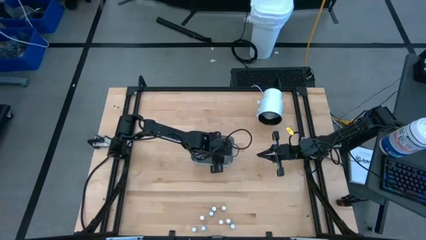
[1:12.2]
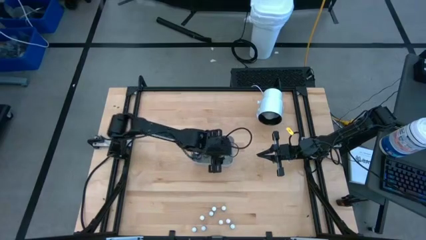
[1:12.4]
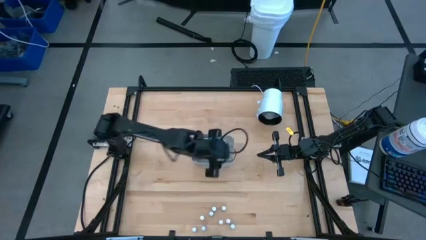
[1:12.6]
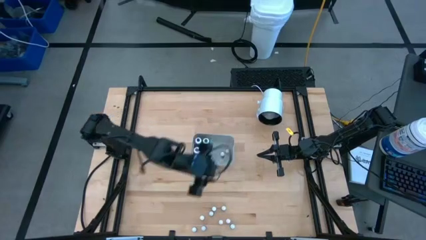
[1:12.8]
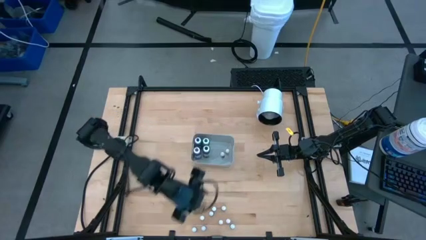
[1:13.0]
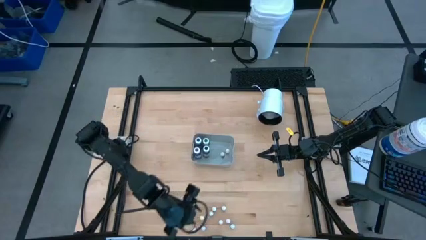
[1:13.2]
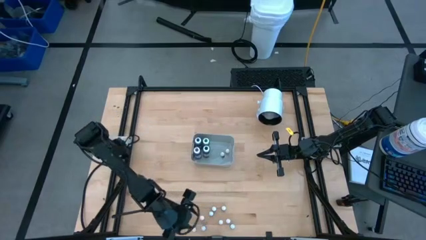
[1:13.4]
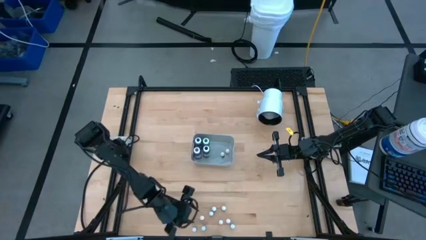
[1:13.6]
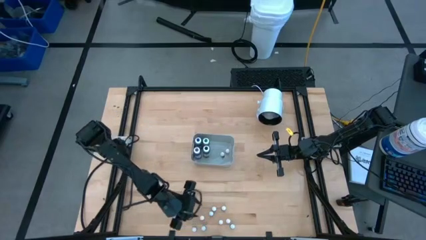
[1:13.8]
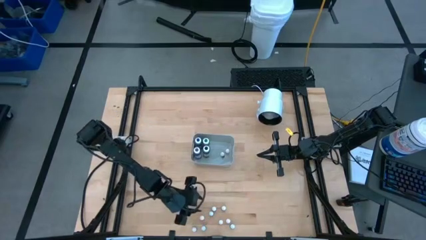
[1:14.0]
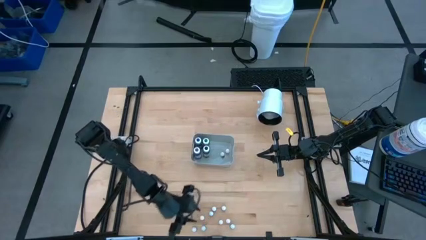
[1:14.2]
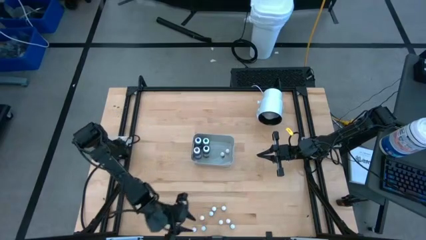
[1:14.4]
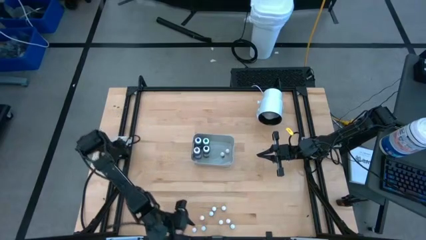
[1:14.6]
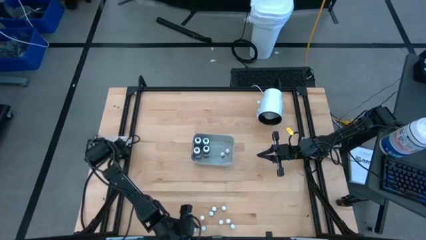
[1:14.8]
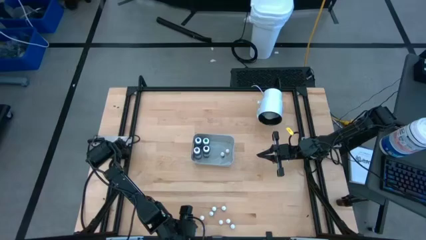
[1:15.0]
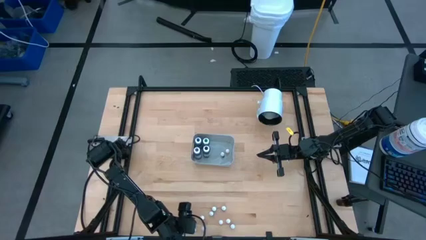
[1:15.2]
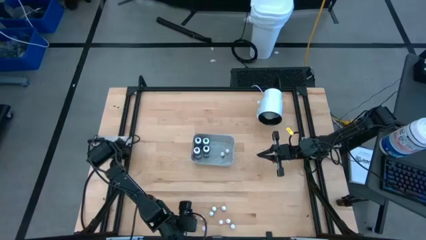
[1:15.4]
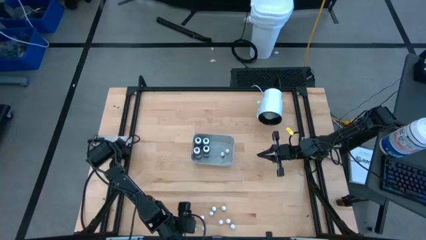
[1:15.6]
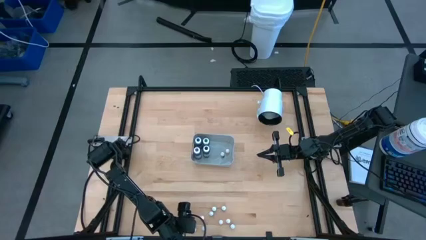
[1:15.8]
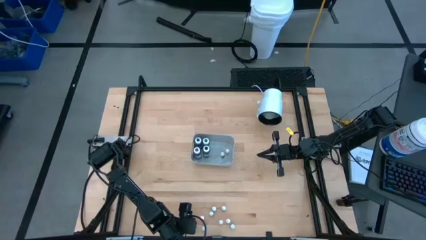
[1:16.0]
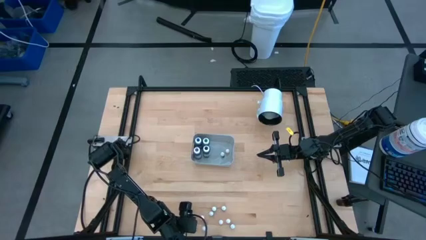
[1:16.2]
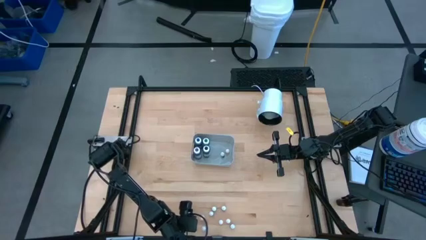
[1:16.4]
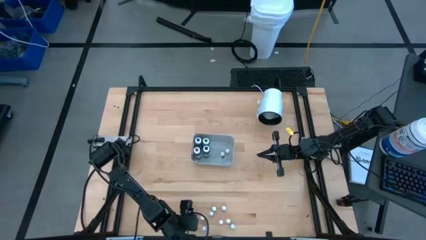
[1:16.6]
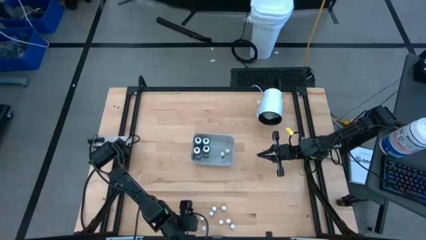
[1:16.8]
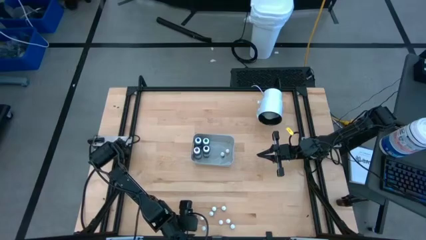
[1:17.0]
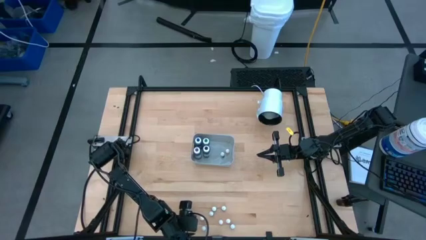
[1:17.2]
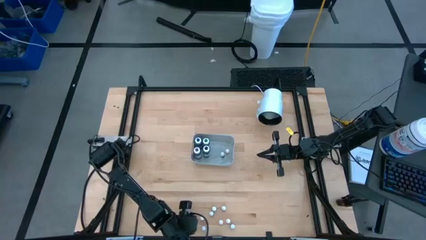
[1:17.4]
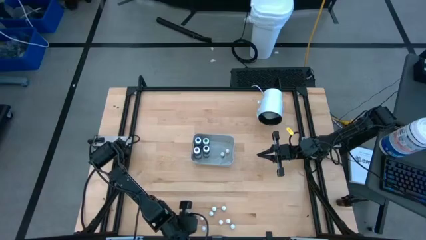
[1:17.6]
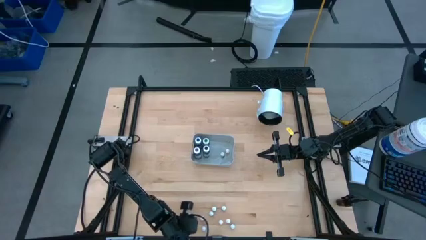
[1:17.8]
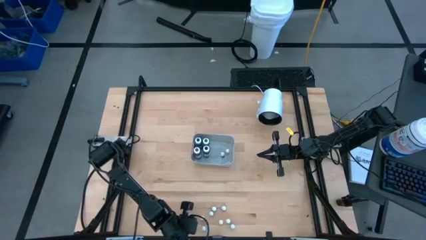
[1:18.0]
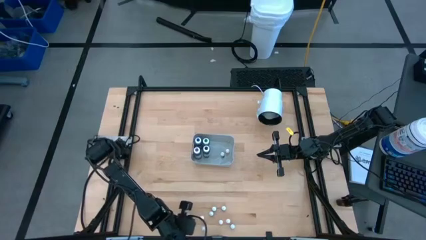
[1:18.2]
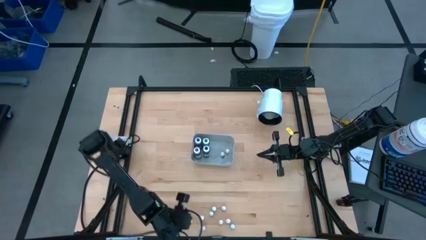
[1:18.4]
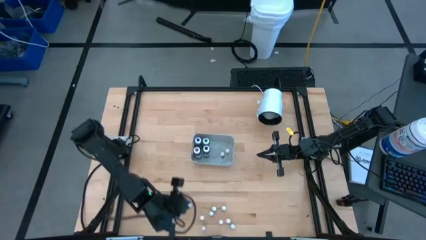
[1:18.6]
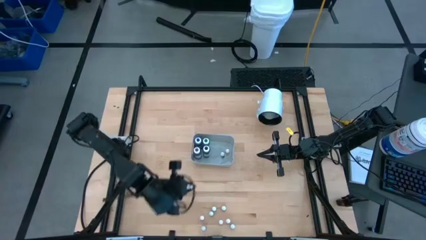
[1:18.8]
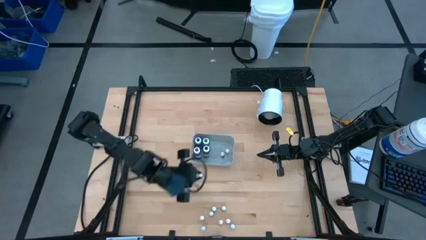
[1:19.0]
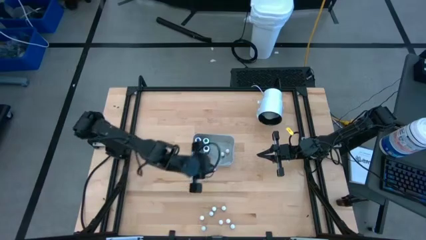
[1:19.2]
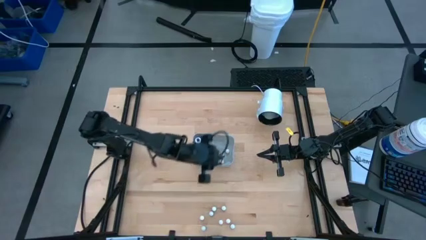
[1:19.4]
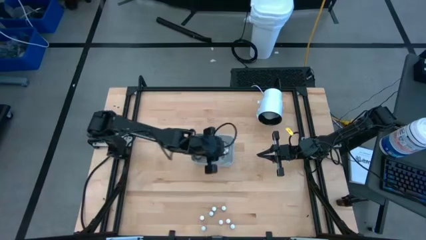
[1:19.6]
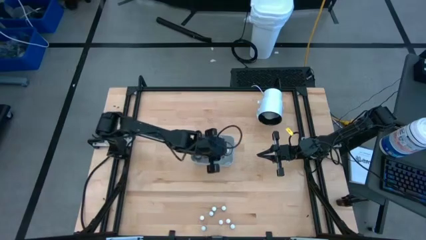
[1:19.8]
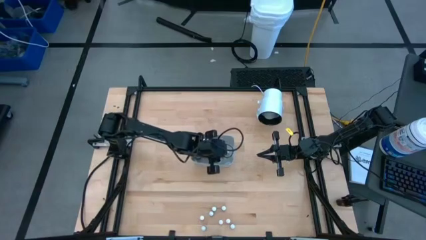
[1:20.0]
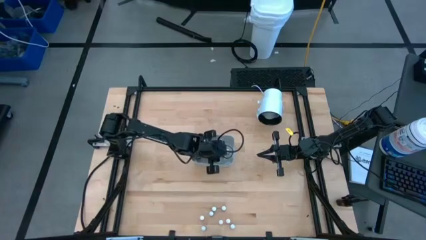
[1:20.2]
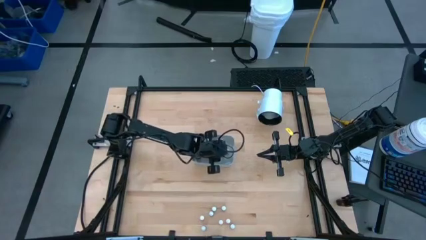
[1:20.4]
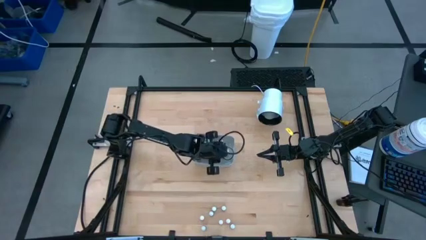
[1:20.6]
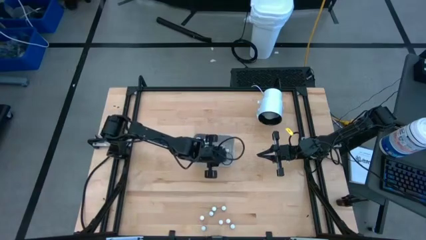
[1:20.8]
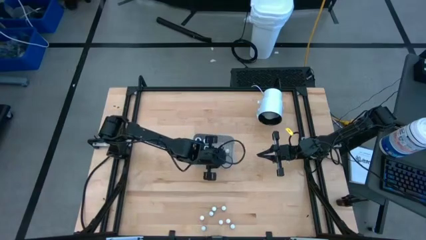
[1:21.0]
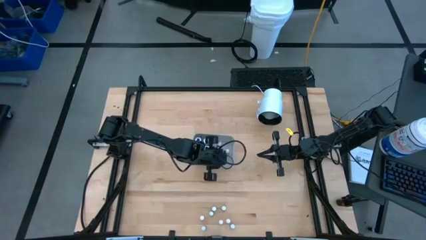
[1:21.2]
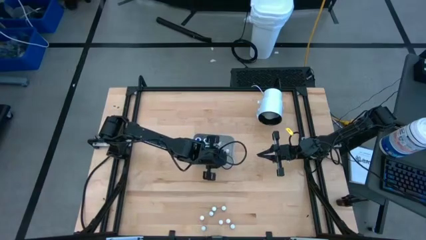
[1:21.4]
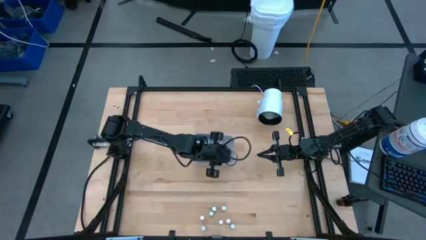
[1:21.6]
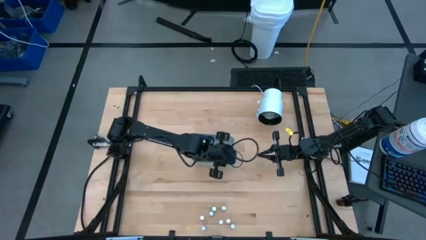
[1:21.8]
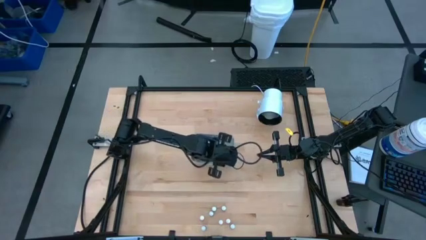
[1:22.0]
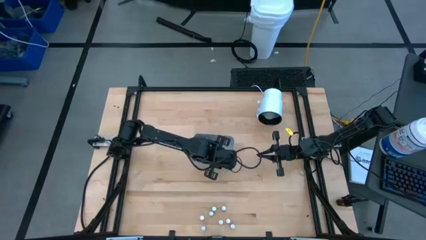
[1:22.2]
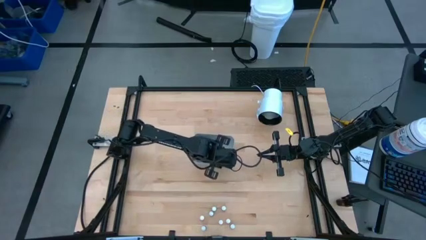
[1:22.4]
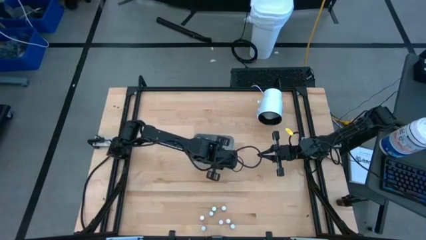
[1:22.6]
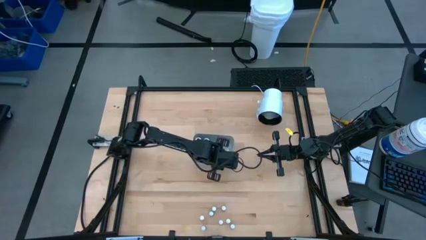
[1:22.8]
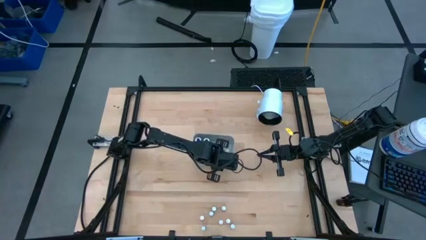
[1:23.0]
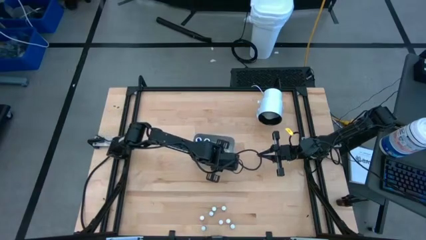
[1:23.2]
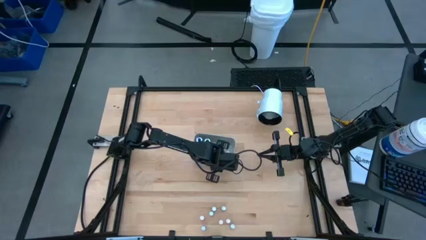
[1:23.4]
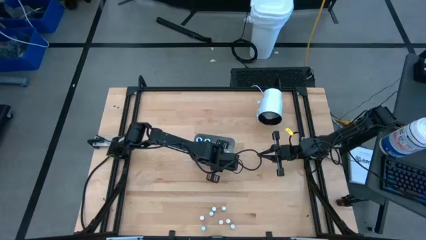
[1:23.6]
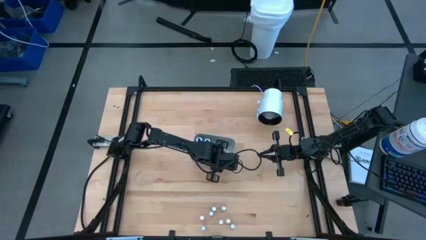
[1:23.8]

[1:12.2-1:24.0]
Task: Pick & Place food coloring
Put the red food coloring bottle into the gray bin
